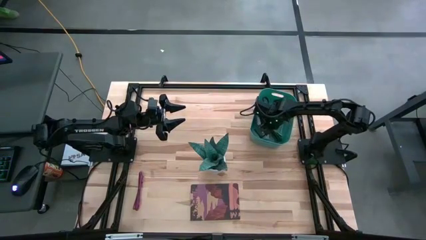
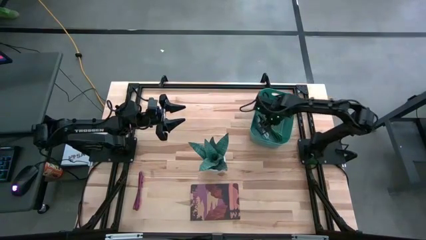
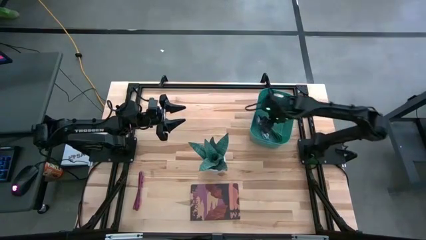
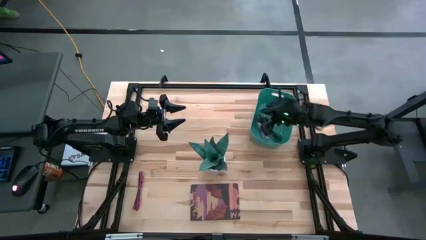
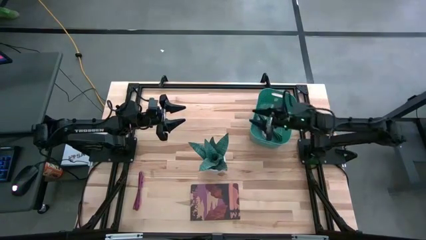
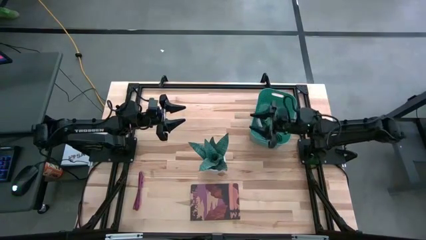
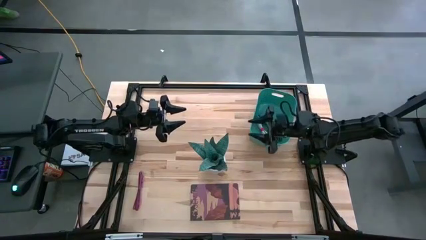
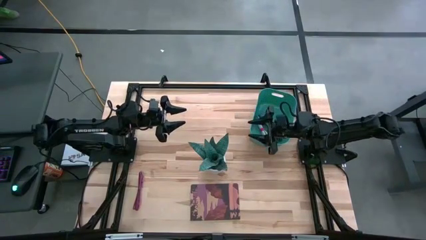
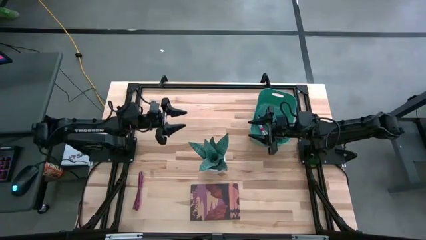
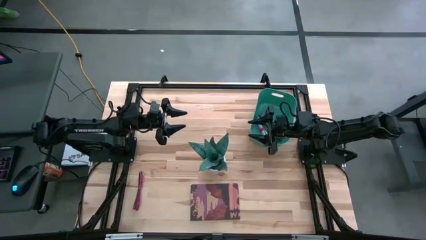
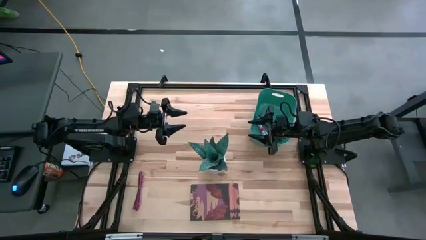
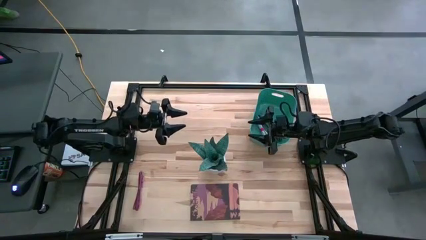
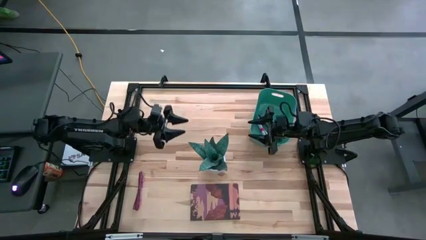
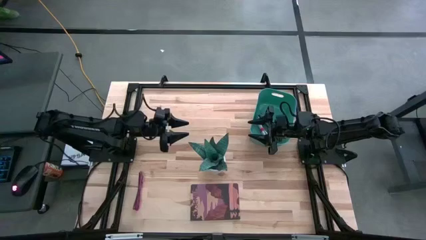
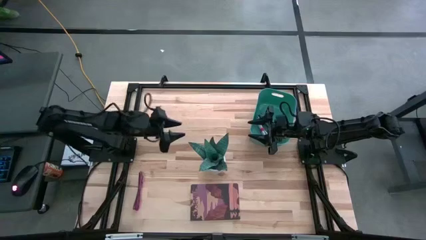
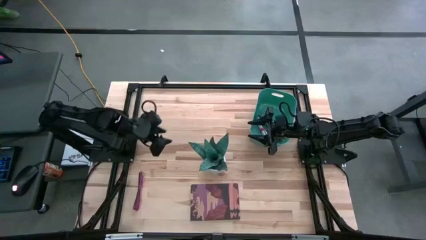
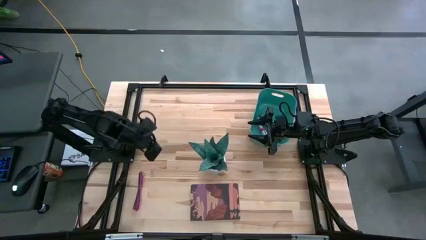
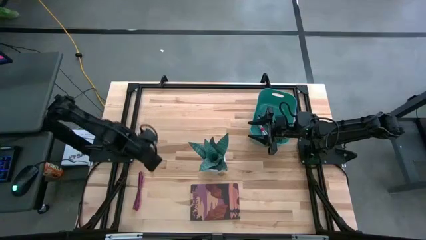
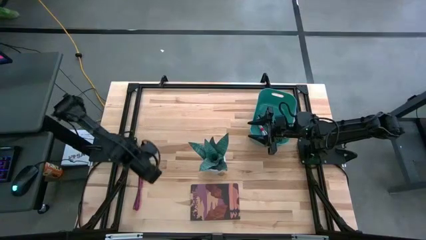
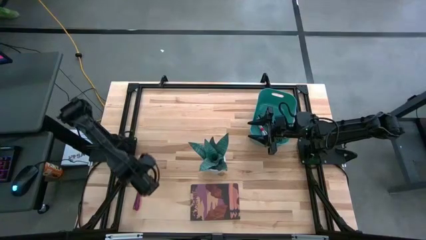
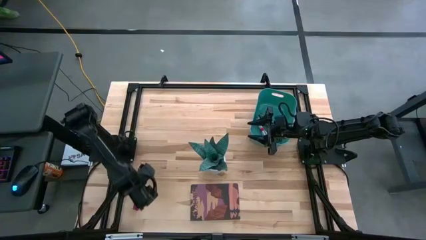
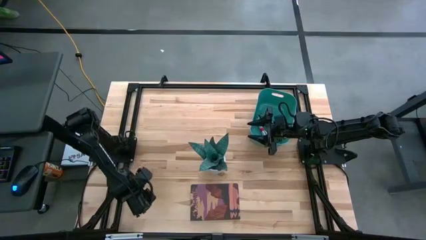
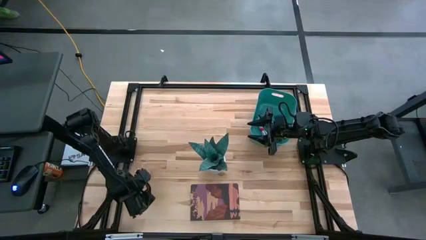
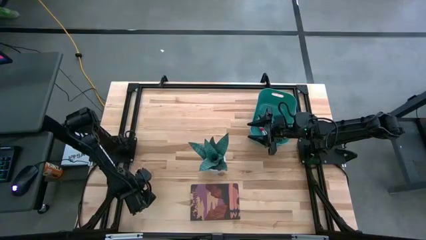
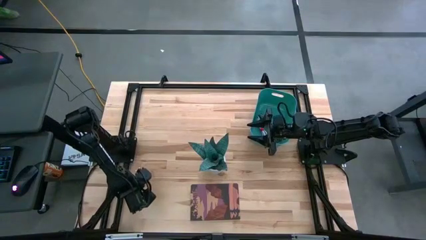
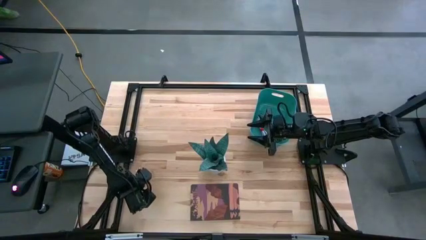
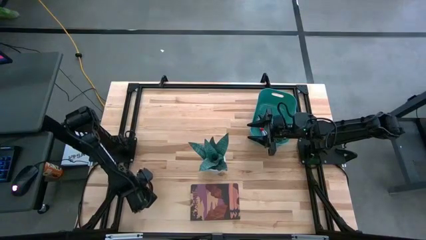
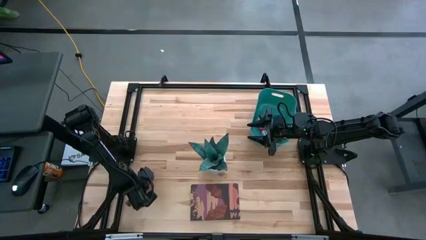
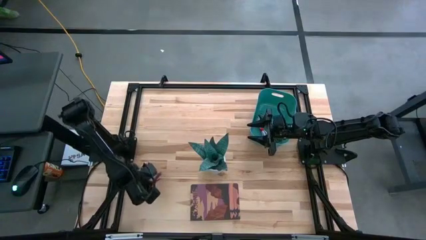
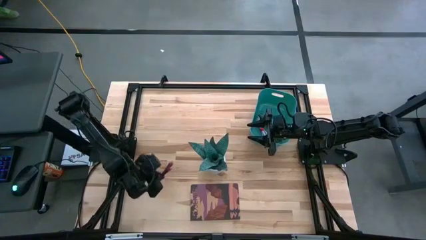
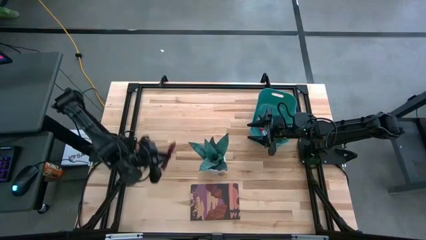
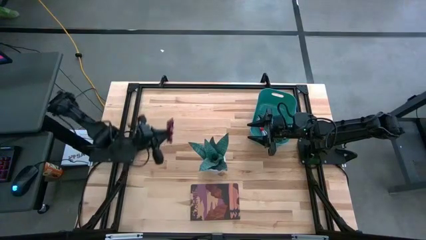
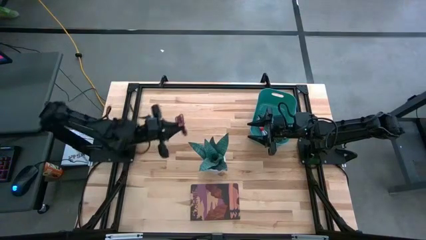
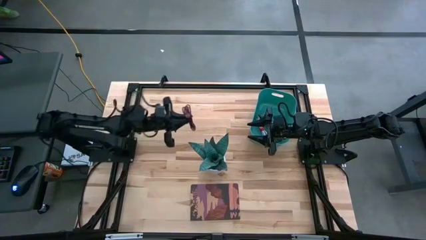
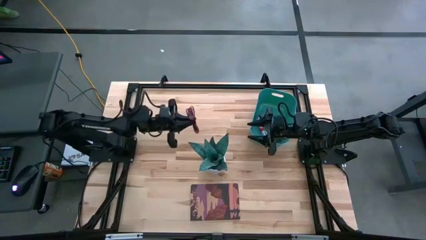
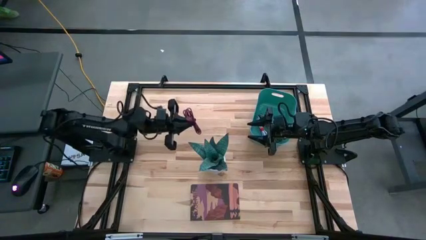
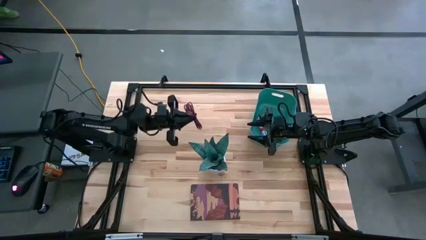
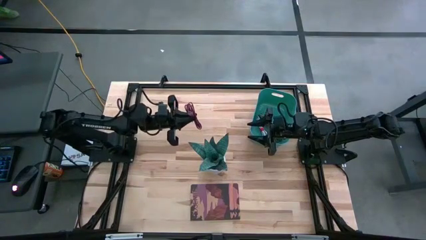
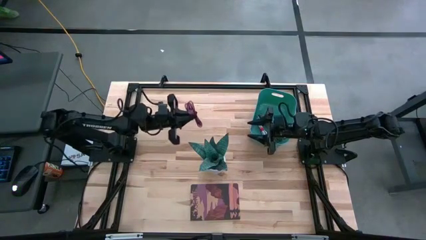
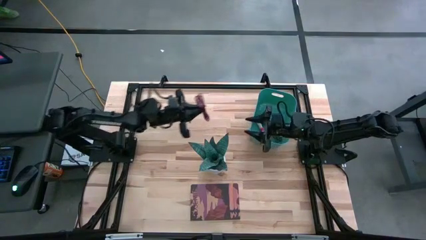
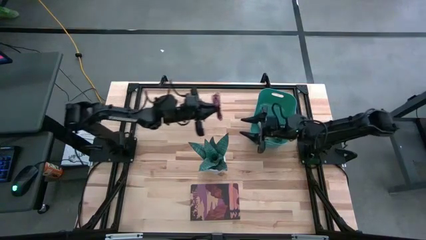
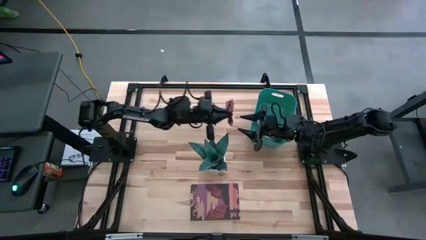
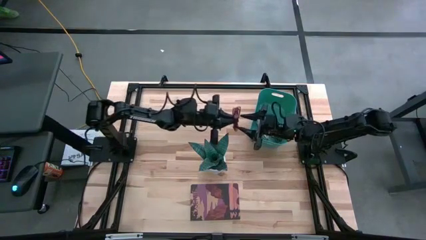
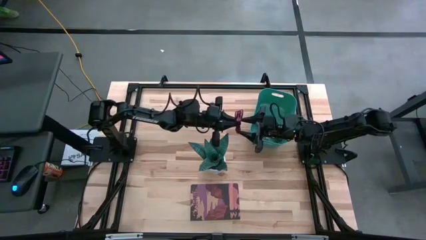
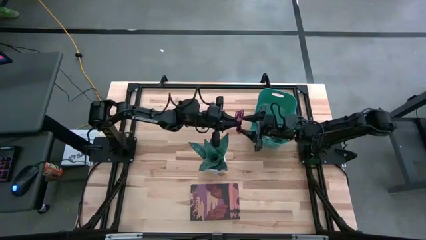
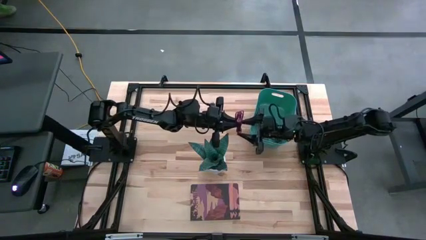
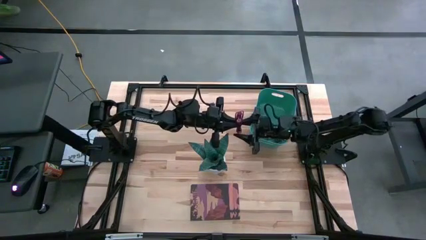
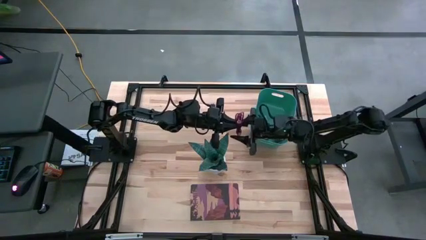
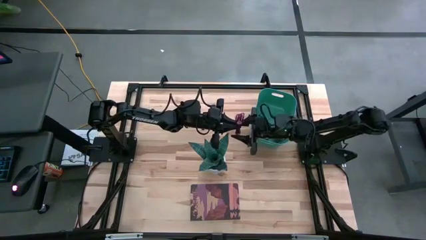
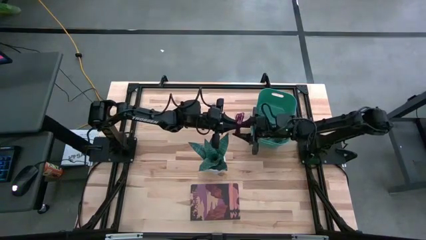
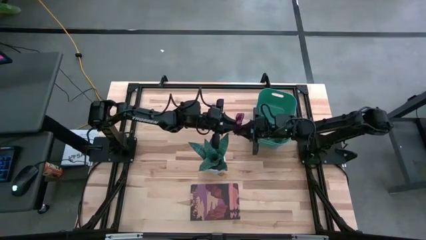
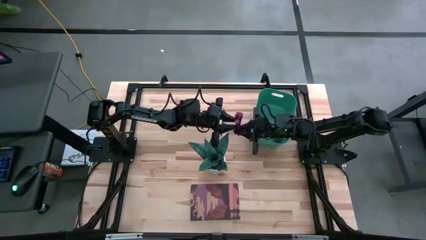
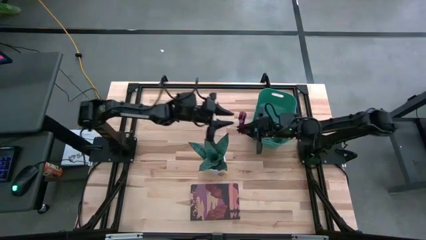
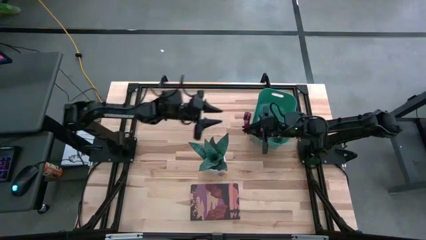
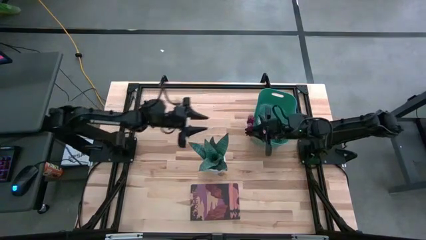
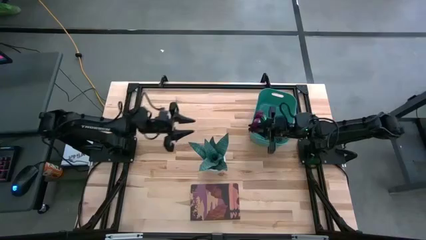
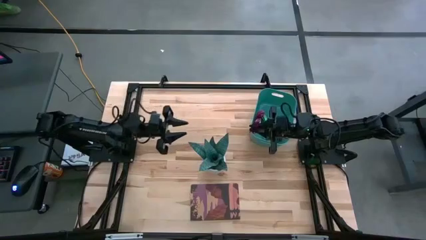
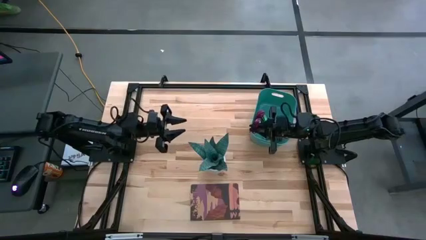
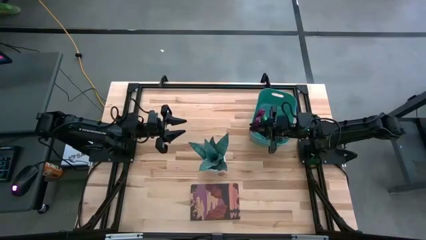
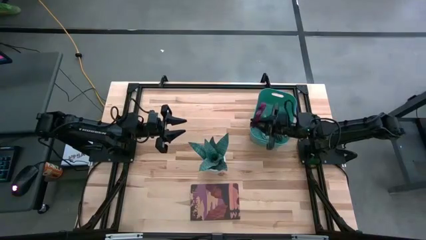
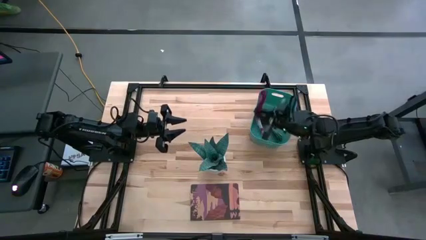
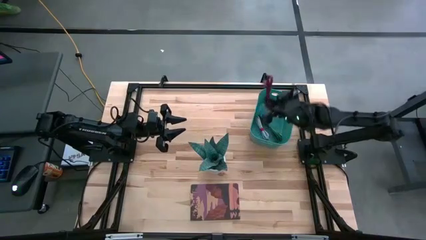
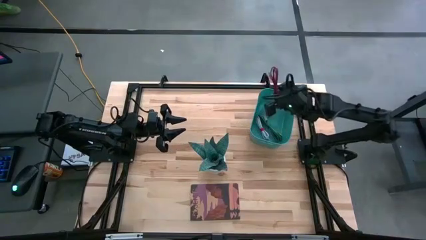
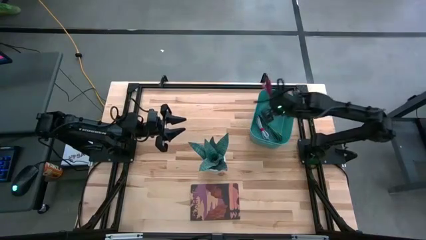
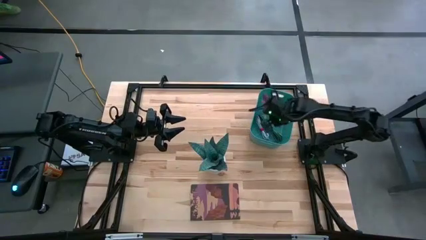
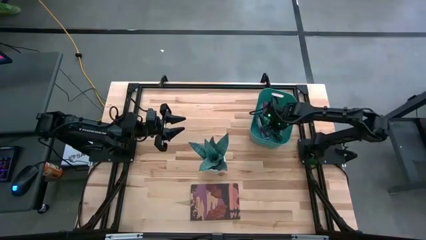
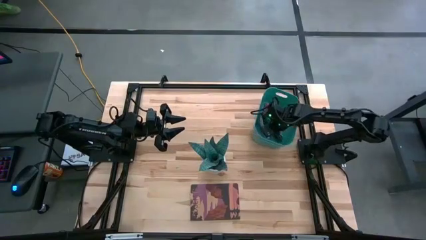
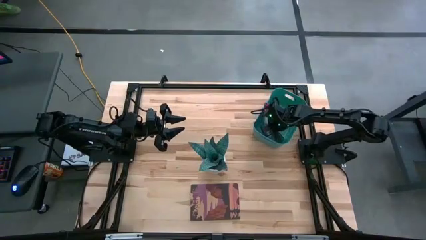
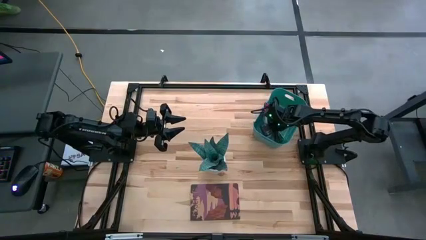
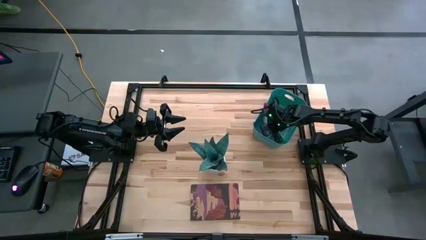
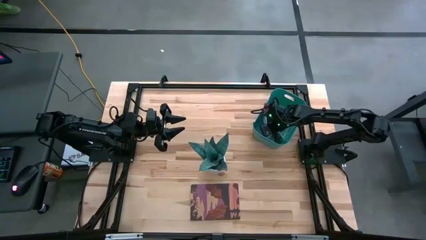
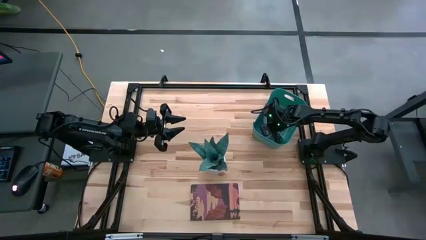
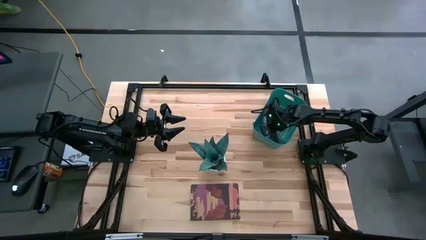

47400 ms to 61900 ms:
Task: Pick and place USB-C Cables
Put the pink patterned charger cable into the green container
